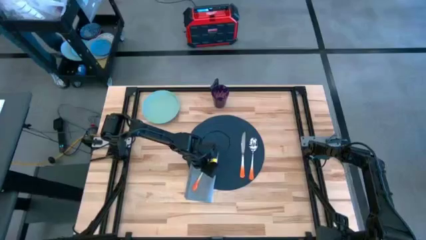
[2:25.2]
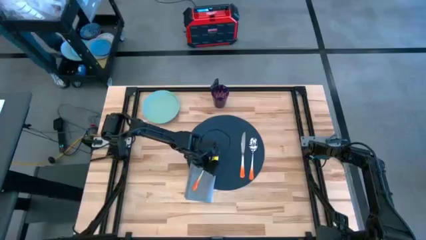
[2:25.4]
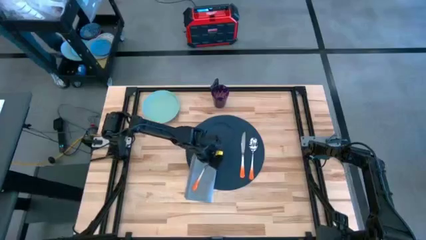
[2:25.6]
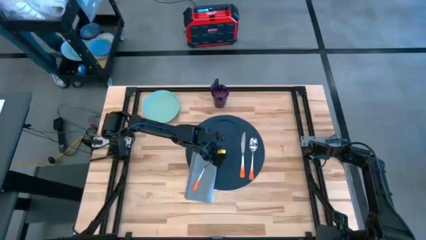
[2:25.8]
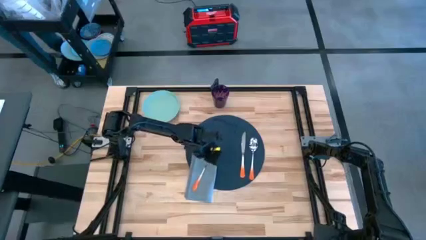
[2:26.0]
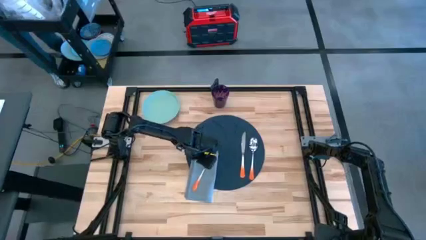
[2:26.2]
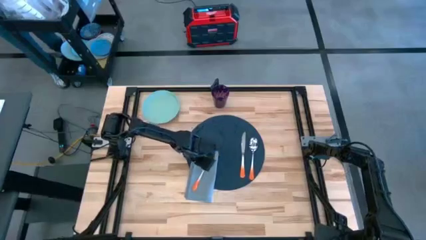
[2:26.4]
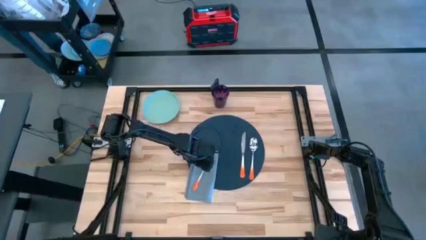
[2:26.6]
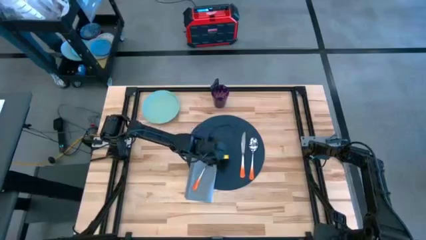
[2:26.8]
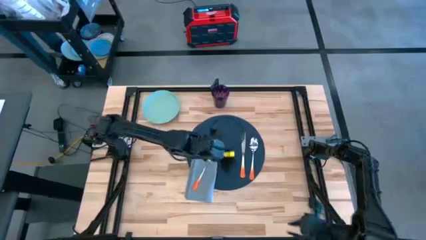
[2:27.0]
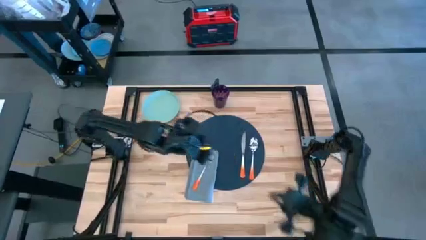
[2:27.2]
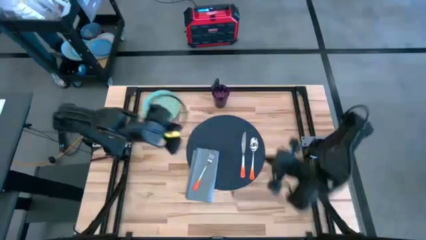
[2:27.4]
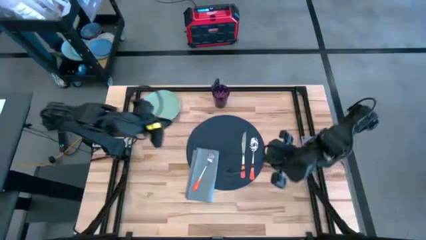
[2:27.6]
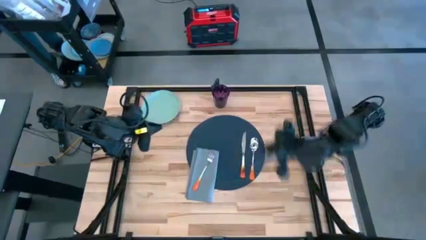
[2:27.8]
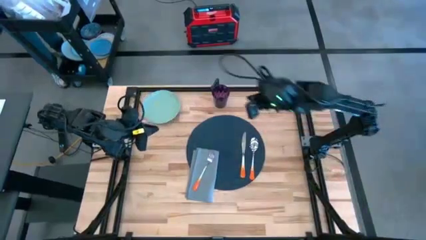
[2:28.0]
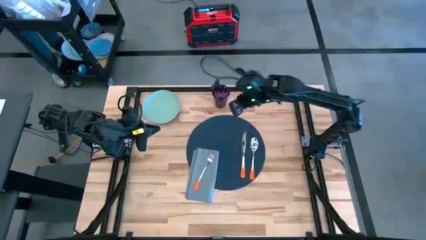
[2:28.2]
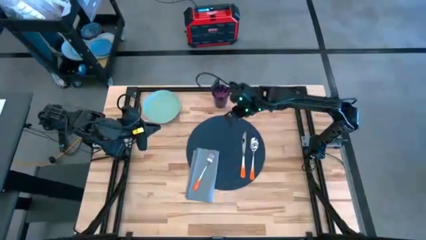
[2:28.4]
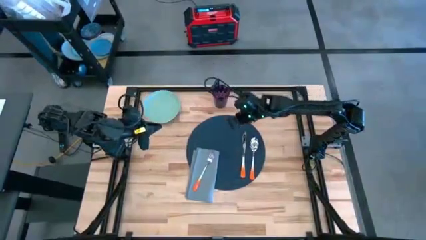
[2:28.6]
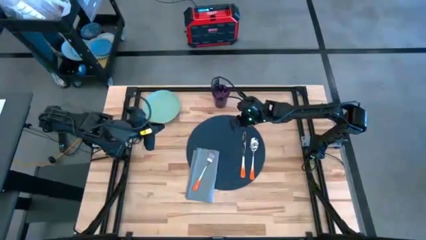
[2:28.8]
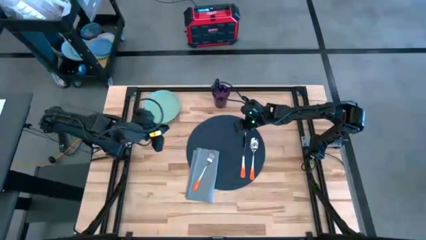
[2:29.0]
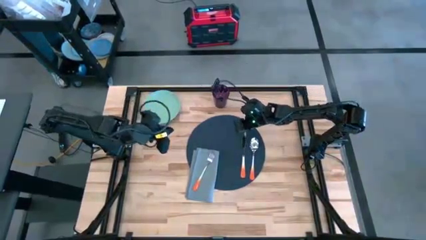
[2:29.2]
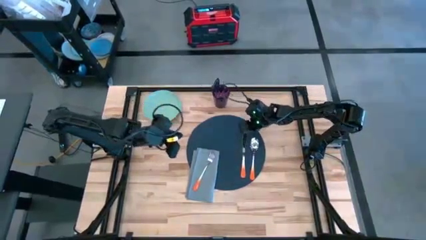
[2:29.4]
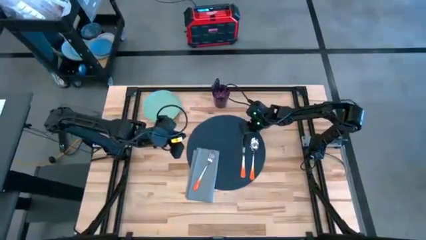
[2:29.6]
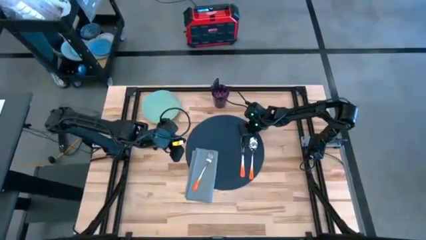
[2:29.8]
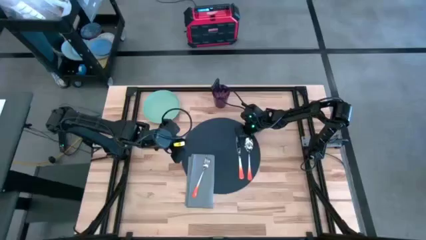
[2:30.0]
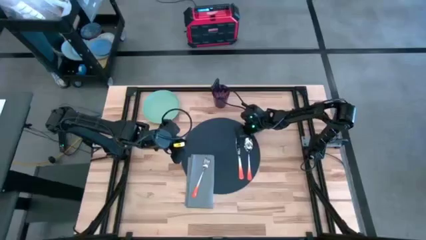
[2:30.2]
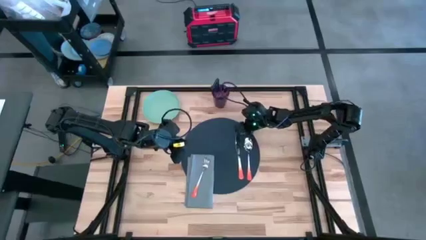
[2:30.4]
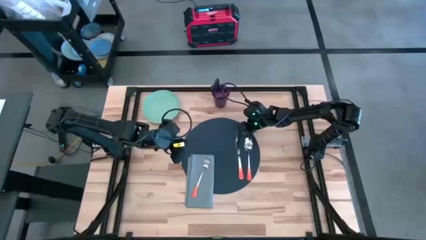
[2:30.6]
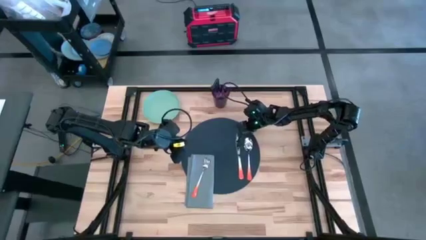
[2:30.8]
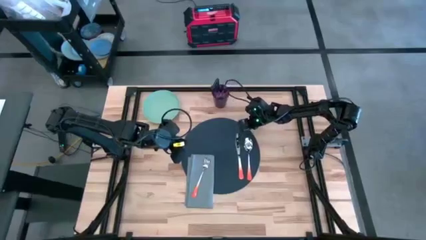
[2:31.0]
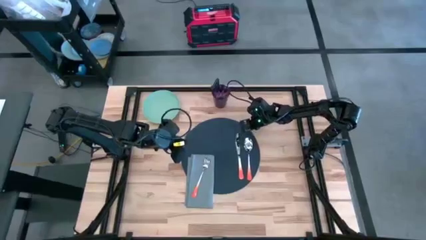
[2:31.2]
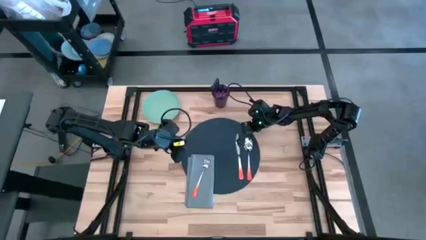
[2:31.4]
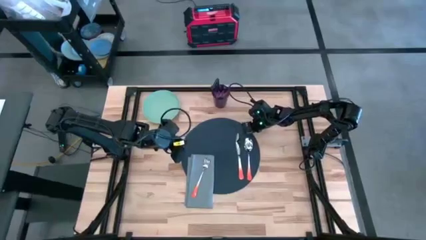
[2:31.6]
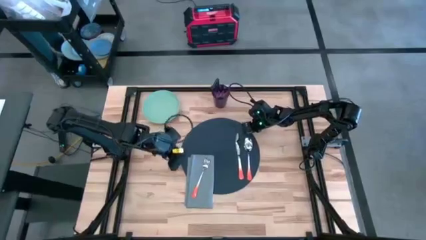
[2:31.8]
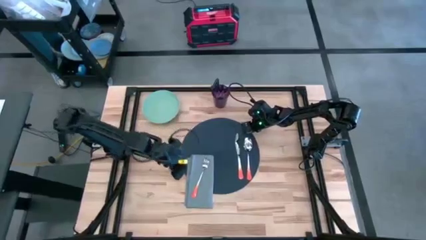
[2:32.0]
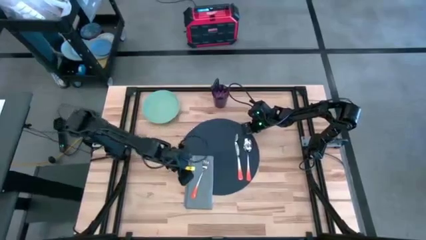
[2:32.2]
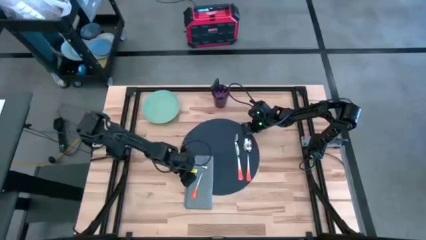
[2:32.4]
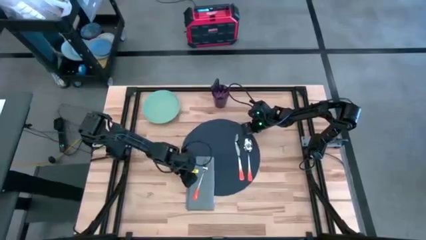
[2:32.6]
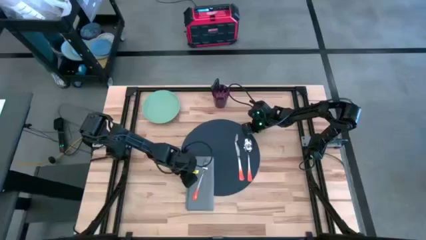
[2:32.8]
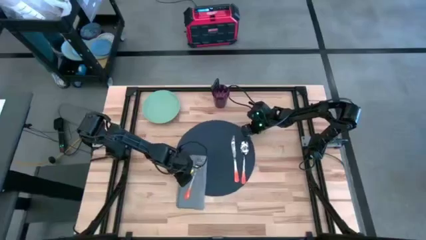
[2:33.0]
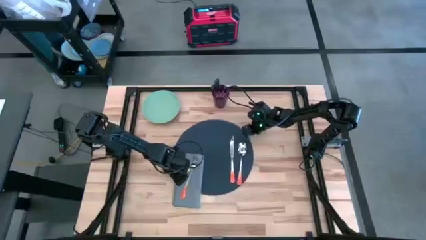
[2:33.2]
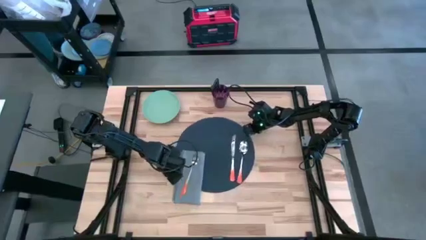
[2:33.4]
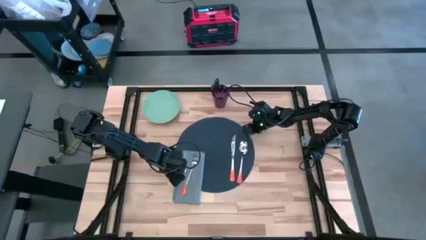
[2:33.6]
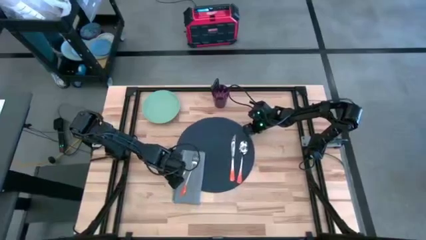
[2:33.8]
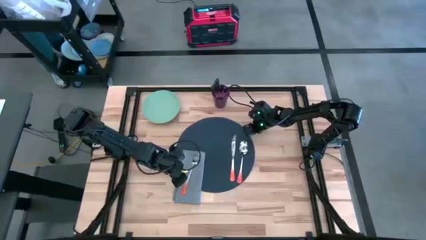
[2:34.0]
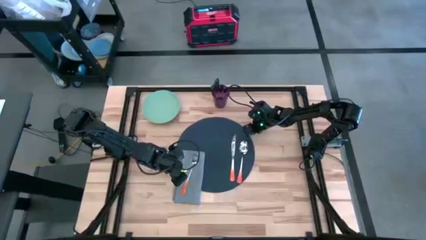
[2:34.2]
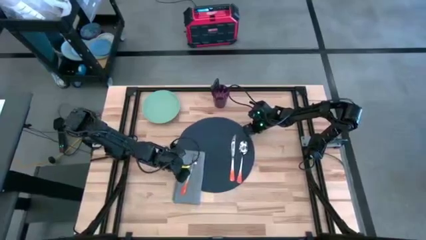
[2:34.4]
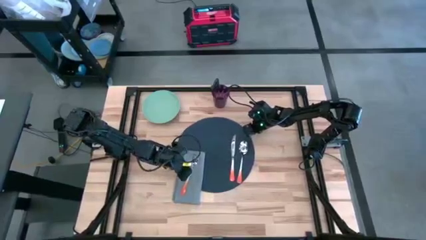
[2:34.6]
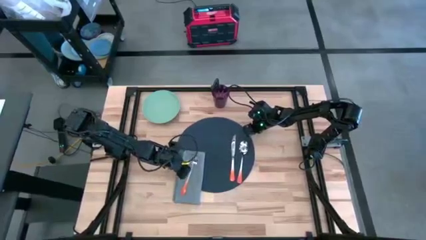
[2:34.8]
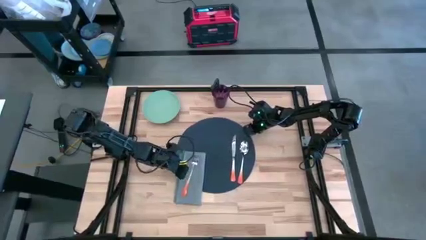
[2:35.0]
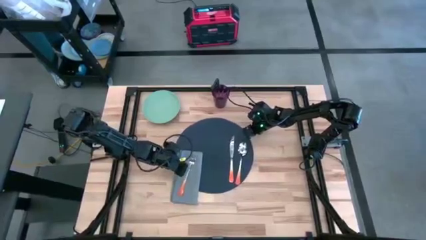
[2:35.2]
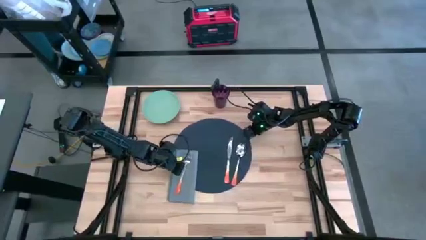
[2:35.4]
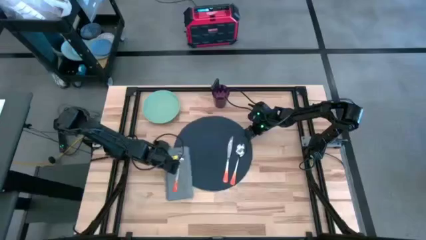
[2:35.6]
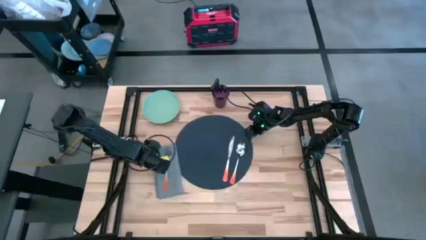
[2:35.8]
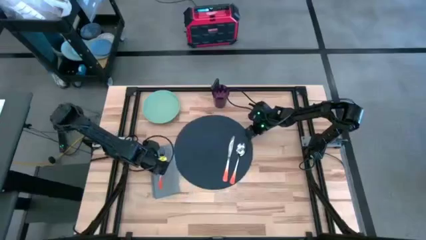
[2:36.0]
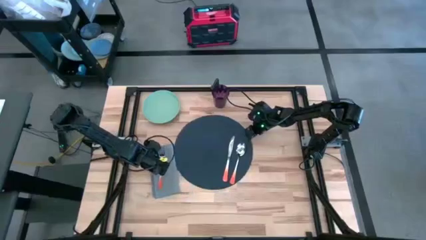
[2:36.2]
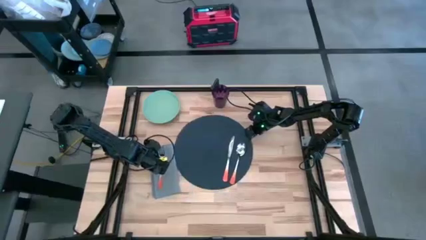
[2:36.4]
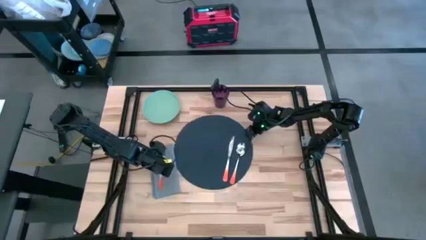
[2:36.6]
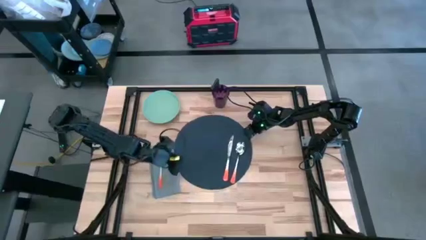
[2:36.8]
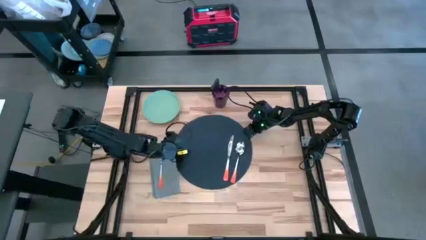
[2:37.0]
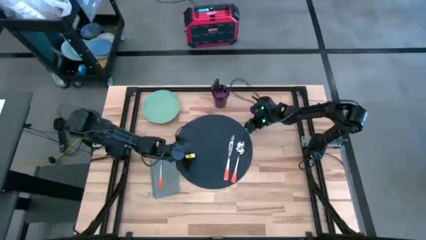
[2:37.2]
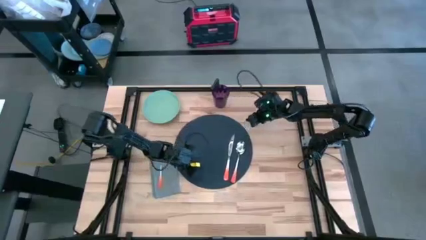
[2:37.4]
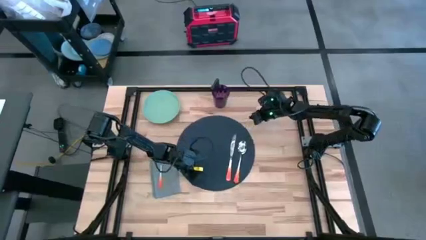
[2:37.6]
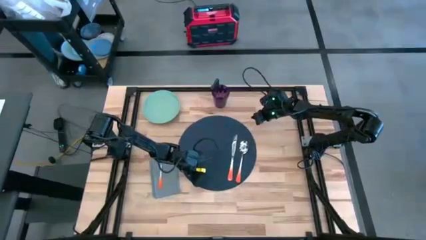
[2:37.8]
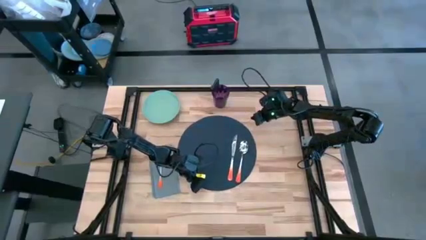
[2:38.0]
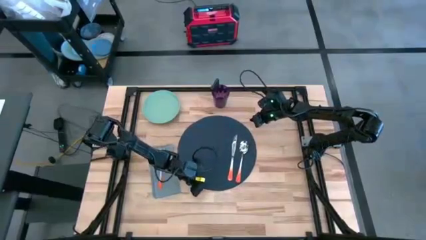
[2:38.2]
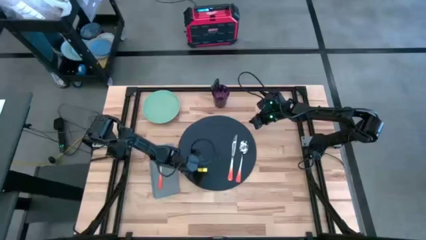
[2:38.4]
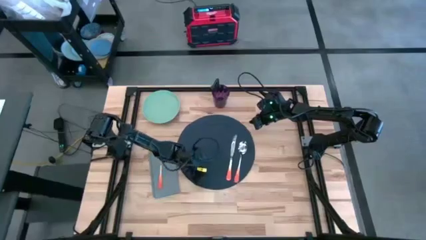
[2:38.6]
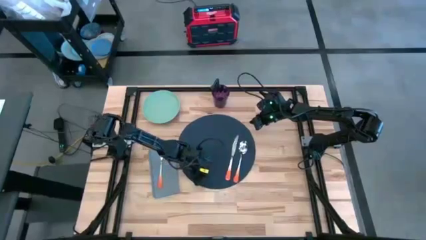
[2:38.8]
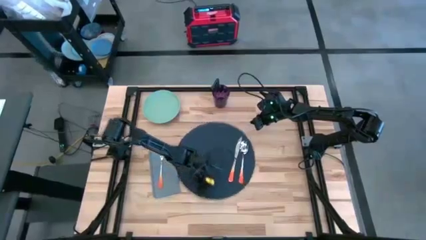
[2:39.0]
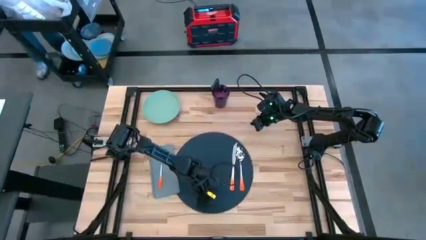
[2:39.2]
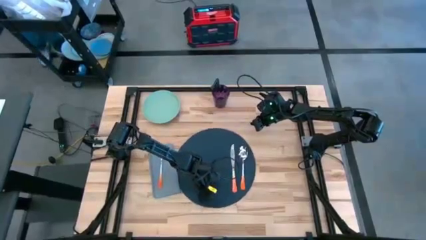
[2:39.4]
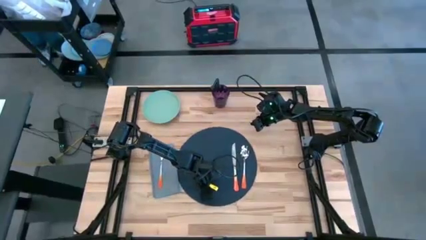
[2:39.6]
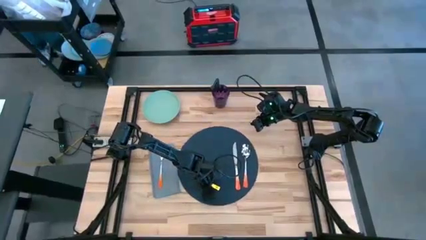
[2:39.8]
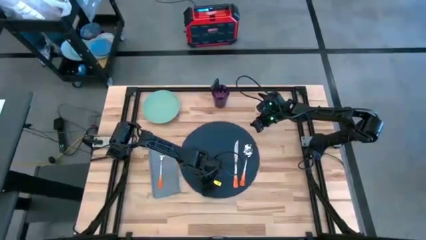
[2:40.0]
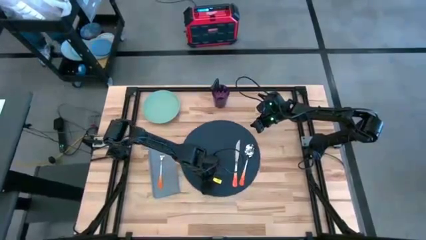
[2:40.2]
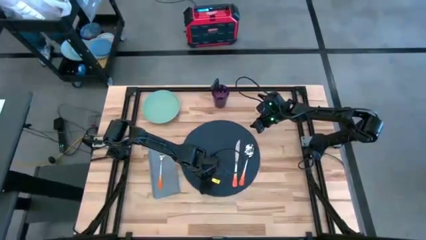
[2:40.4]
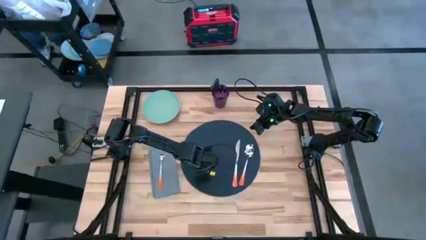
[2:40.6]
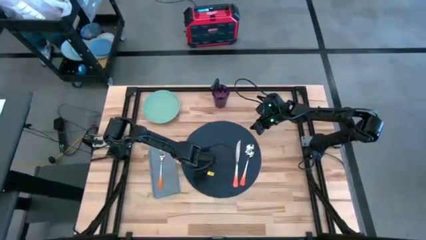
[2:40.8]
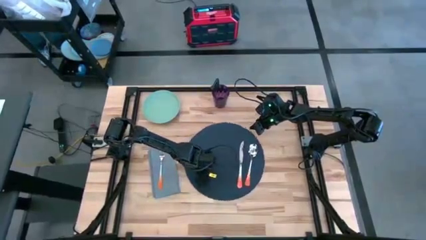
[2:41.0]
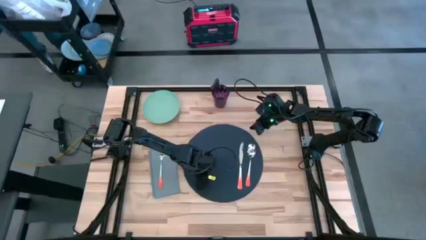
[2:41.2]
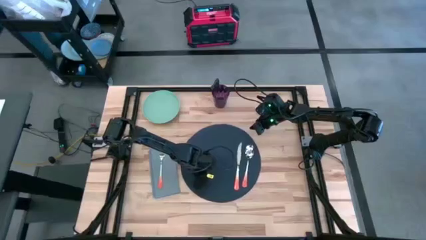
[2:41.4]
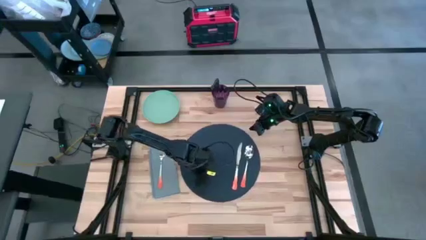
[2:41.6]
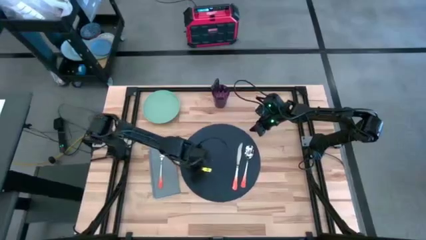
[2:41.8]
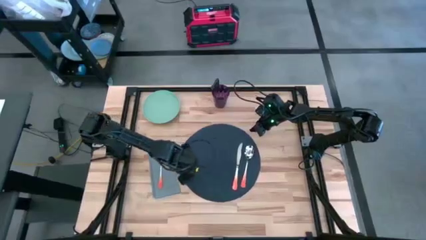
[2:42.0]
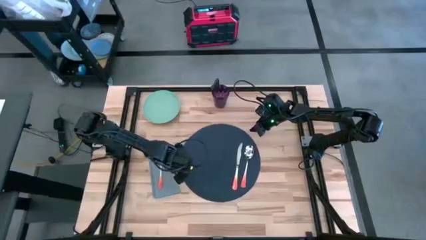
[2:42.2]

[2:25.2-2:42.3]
Task: Set table place
Adjust the table mat to the center table

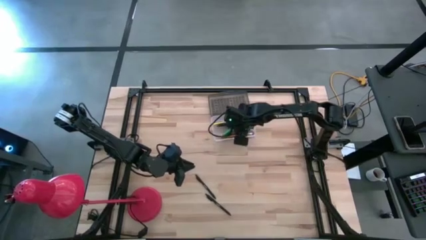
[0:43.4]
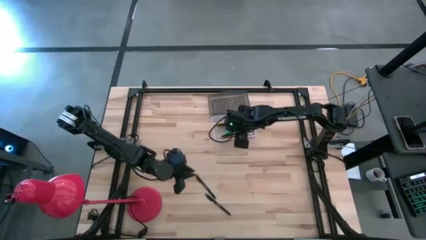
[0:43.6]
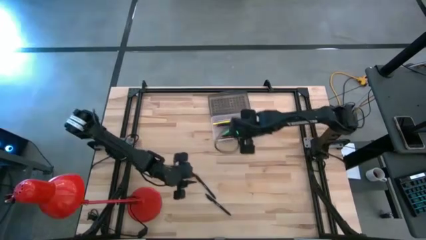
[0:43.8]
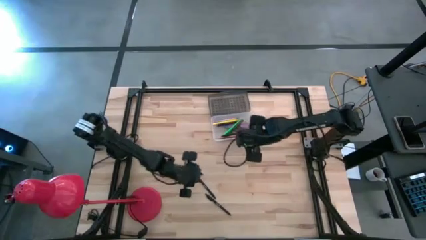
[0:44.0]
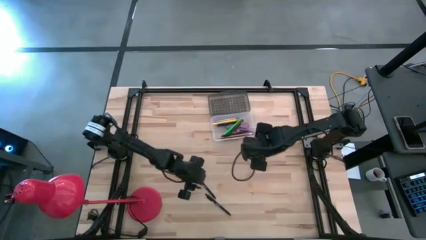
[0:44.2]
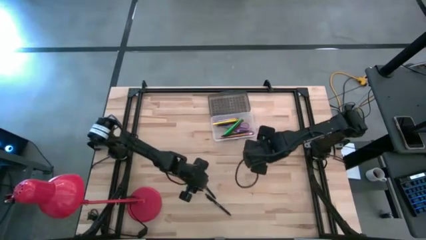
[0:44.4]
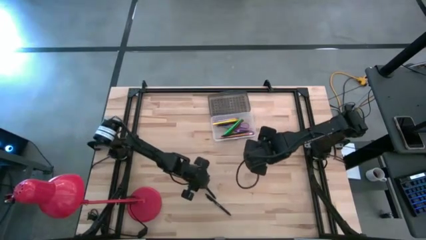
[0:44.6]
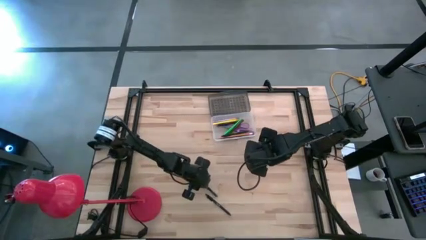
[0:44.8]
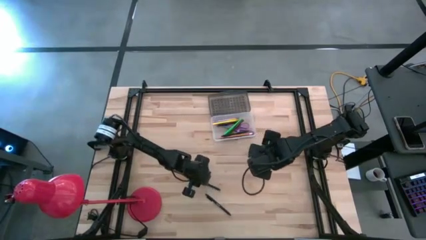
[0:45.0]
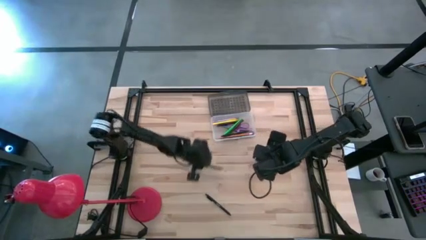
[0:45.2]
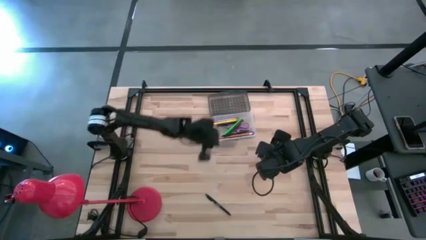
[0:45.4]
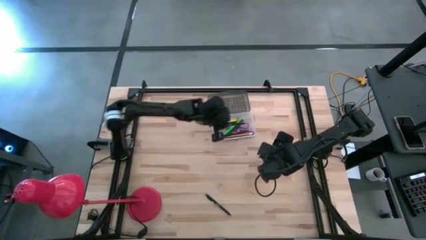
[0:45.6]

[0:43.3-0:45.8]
Task: Pick & place school supplies into a supply box
Put the black ballpen into the gray supply box
